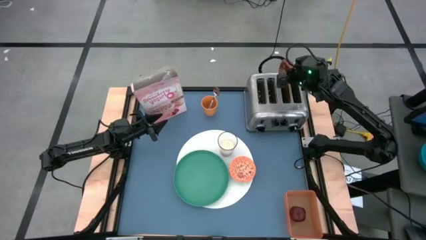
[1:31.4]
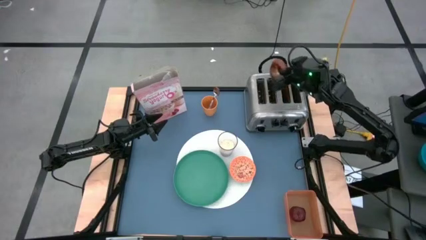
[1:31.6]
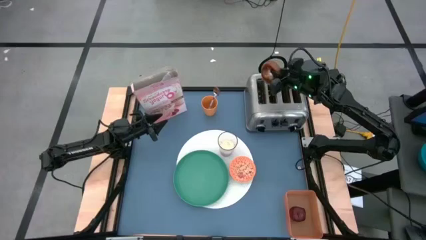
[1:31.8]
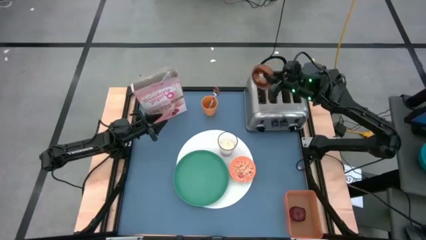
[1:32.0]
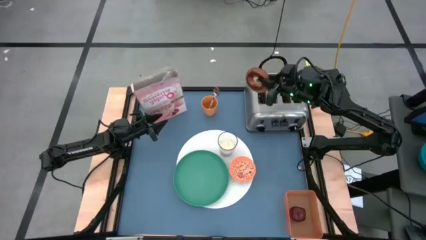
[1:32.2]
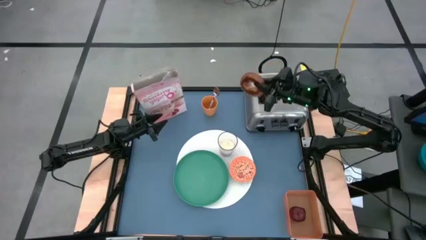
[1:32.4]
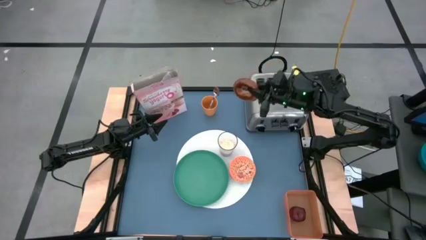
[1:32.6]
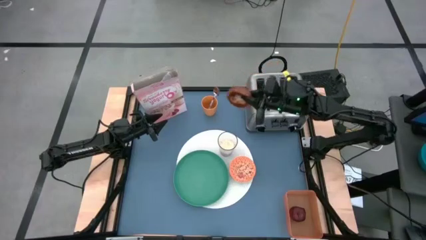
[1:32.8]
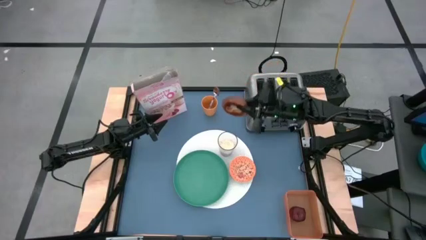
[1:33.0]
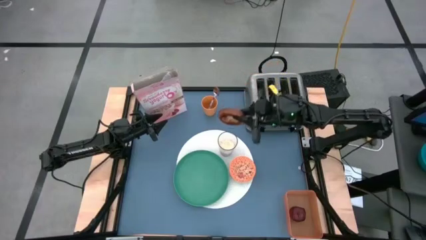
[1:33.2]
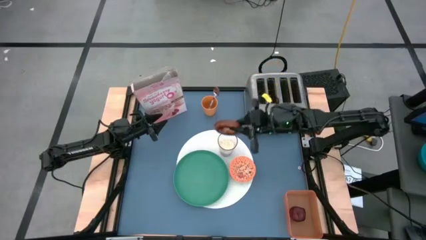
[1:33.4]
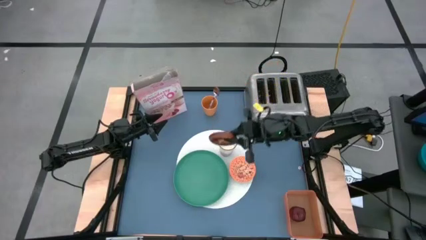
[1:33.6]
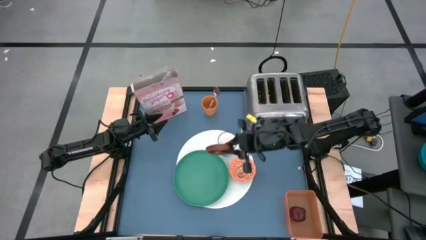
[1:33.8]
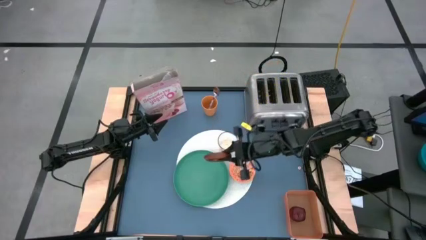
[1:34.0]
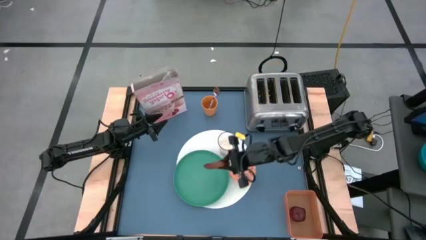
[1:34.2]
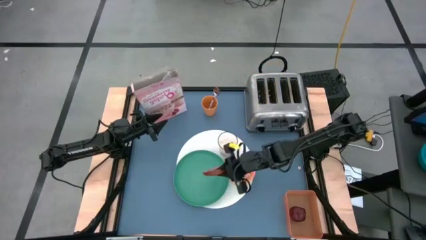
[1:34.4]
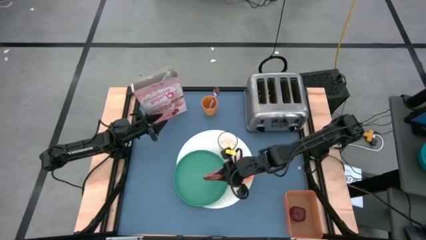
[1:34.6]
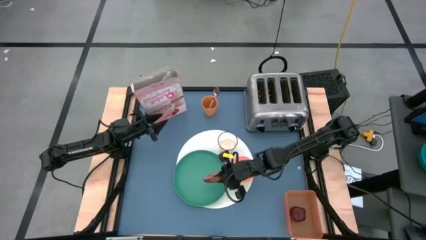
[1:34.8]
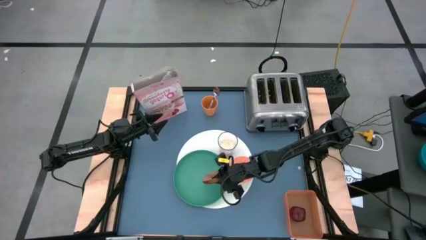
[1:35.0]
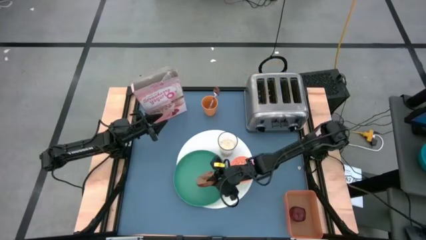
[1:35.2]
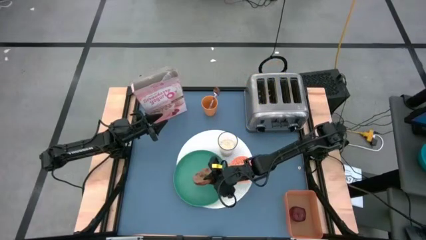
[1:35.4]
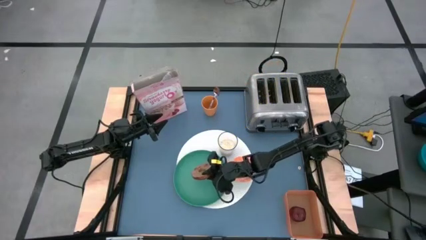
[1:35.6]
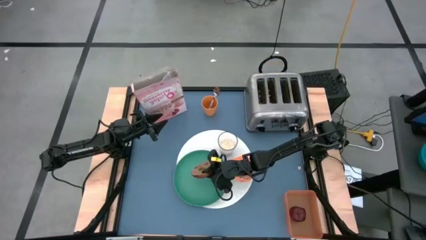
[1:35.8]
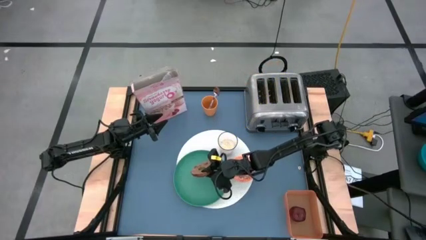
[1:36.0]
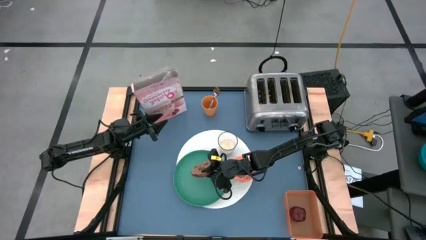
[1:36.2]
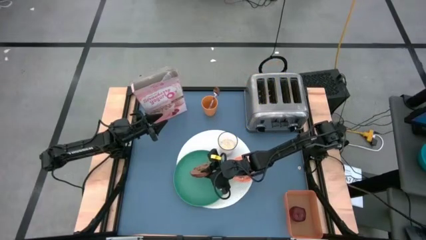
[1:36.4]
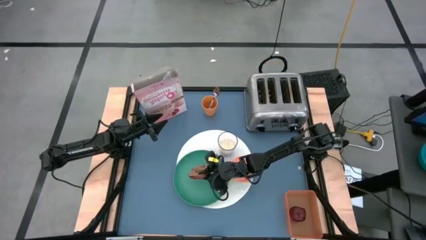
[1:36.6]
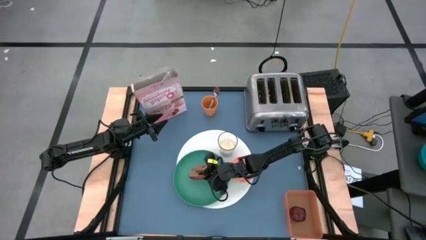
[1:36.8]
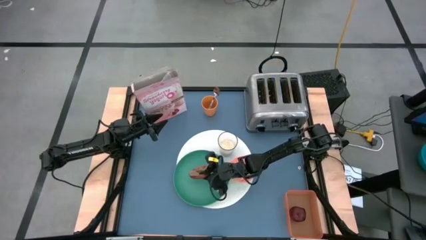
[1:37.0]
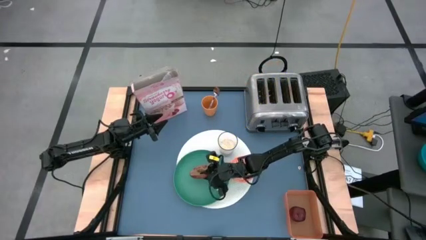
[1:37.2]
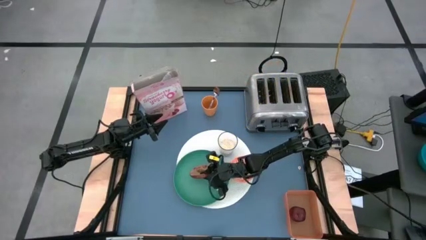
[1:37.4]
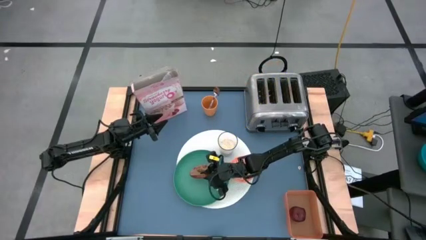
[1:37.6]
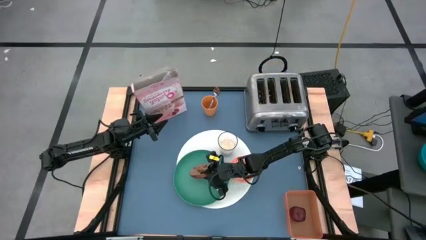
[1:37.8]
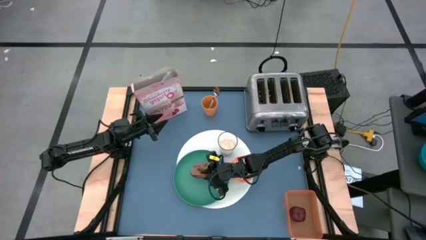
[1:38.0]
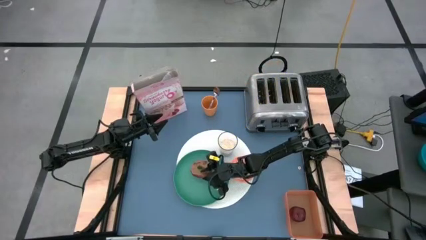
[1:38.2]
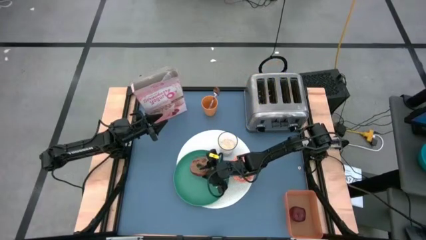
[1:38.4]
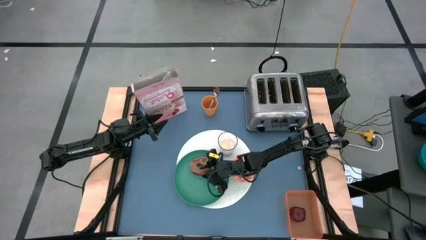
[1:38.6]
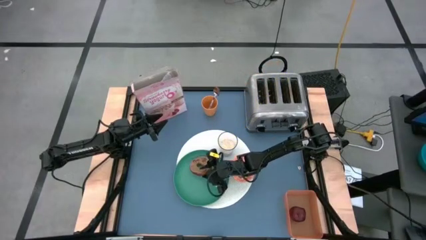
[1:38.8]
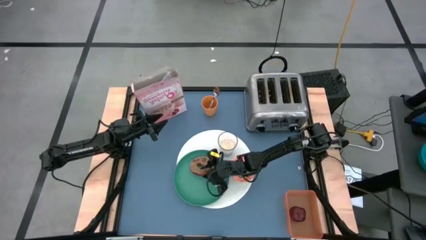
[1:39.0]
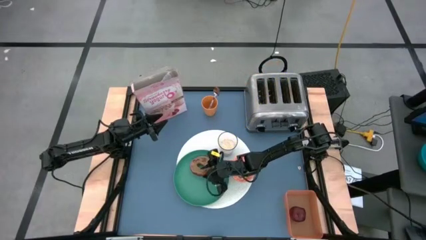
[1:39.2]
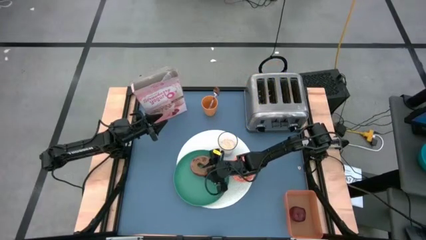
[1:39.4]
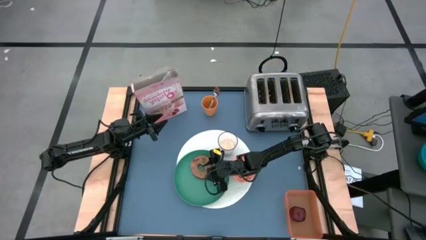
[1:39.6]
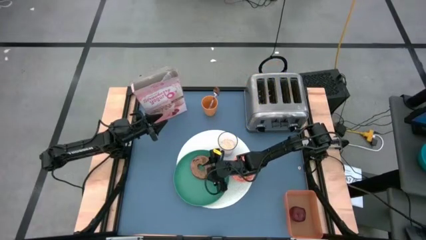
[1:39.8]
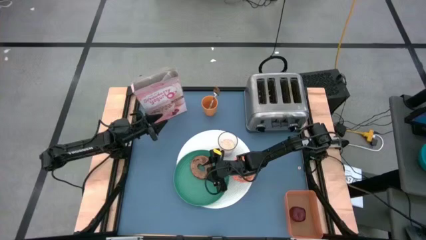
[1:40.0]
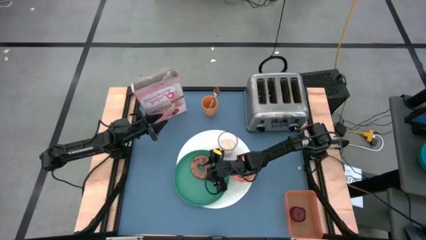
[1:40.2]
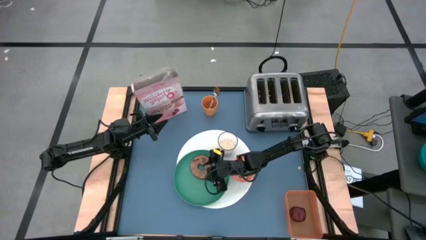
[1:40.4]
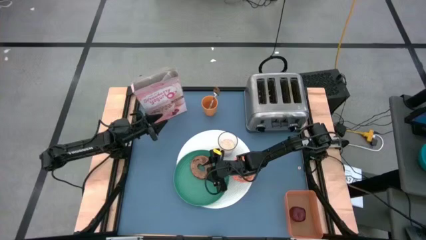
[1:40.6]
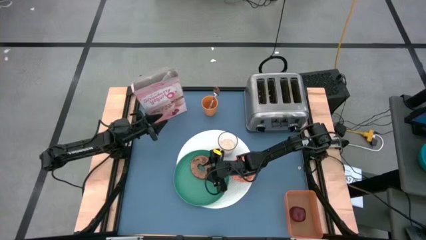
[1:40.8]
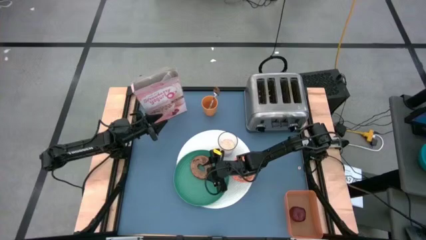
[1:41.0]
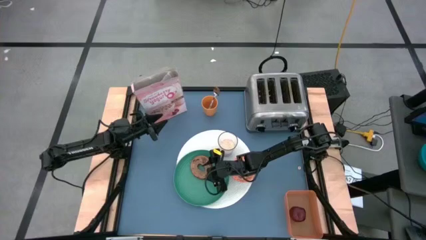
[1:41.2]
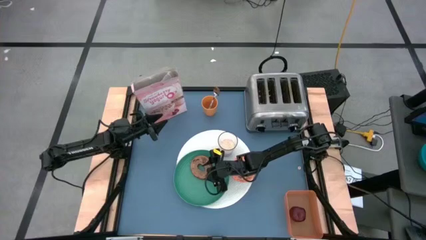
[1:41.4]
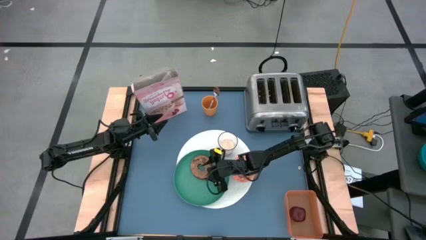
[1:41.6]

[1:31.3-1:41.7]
Task: Arrange a breakfast setting
Put the bagel from the toaster on the green plate
